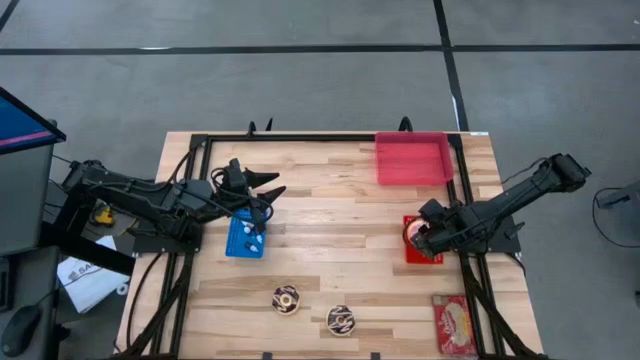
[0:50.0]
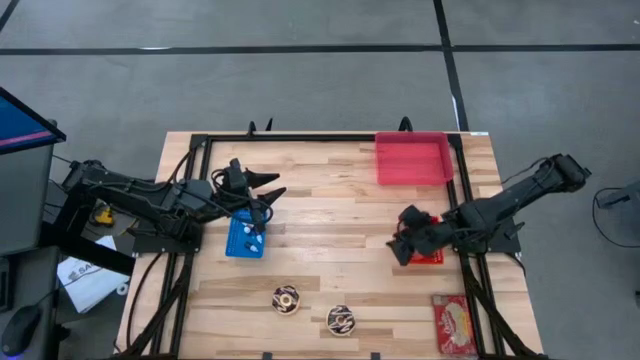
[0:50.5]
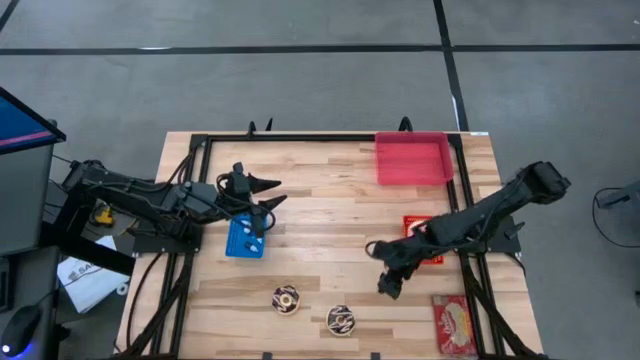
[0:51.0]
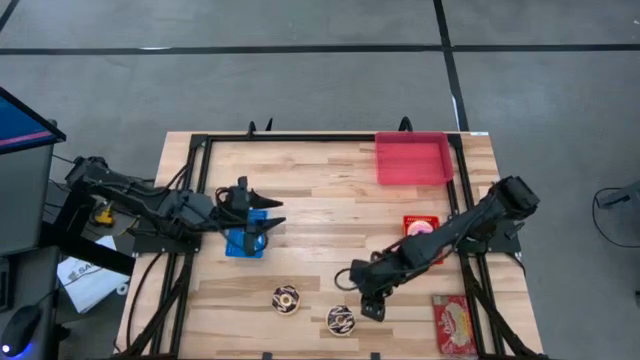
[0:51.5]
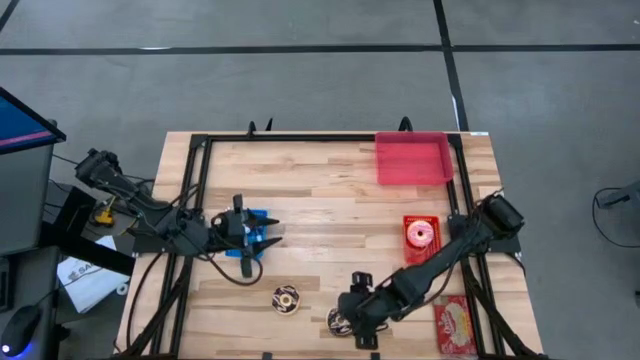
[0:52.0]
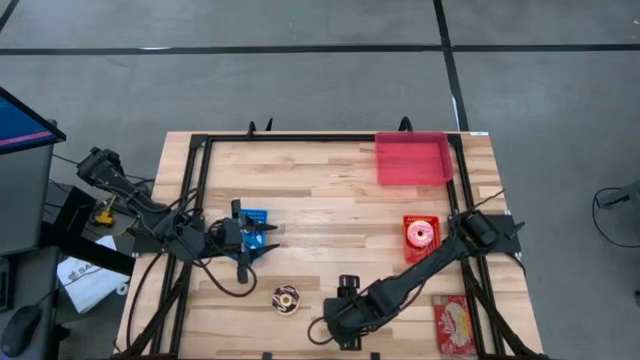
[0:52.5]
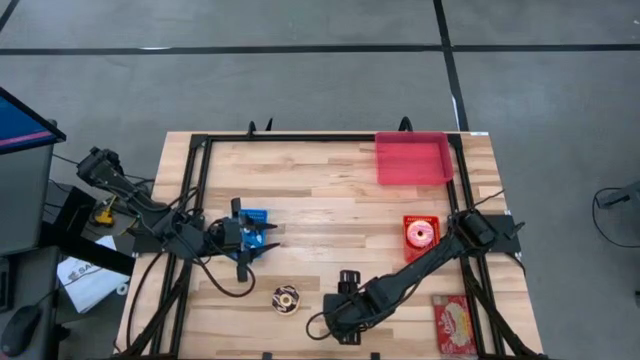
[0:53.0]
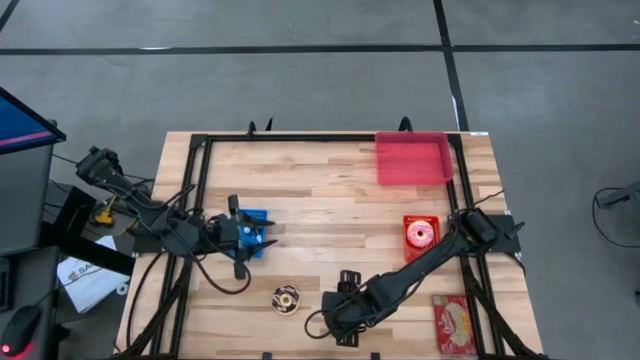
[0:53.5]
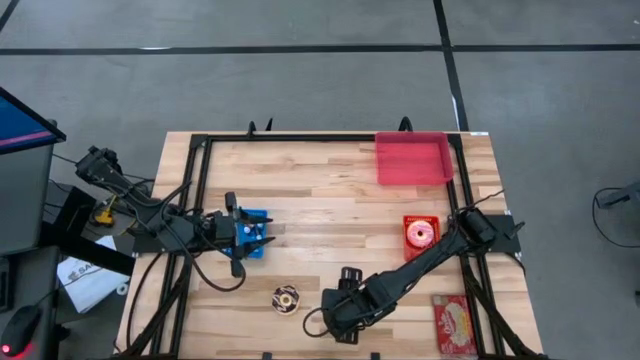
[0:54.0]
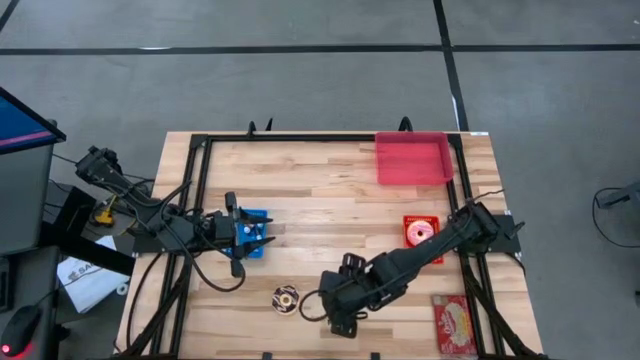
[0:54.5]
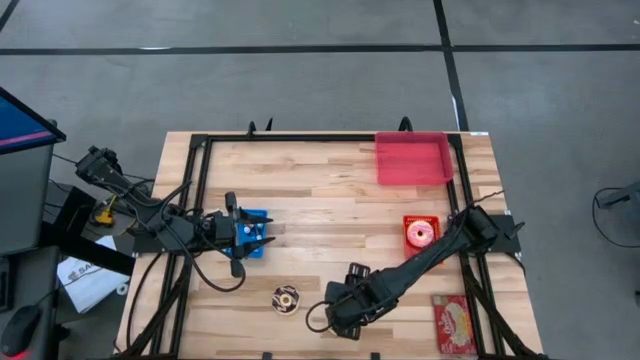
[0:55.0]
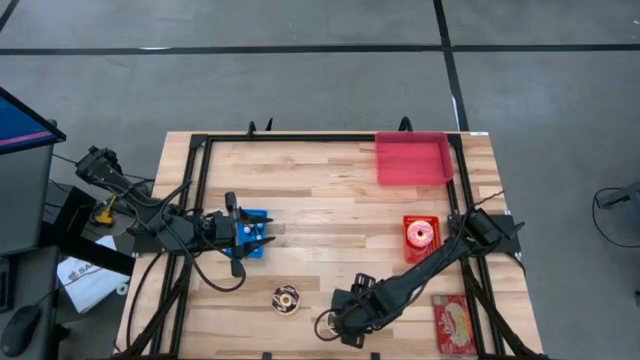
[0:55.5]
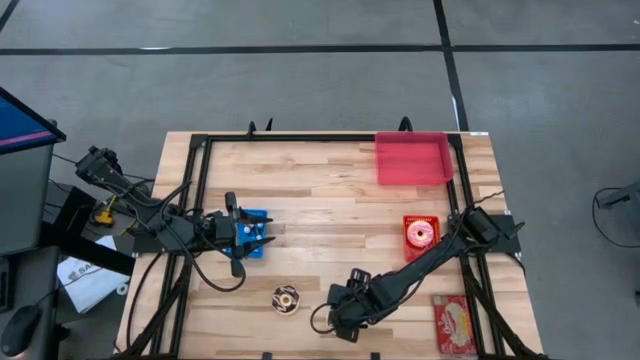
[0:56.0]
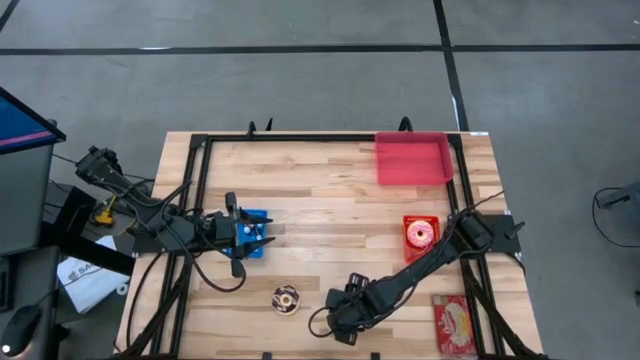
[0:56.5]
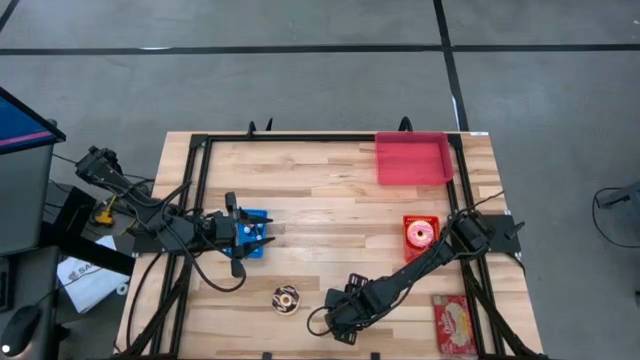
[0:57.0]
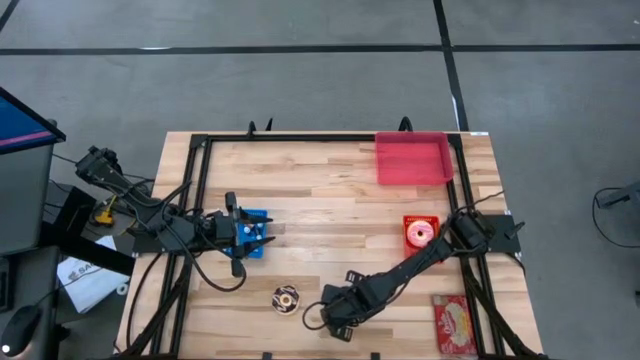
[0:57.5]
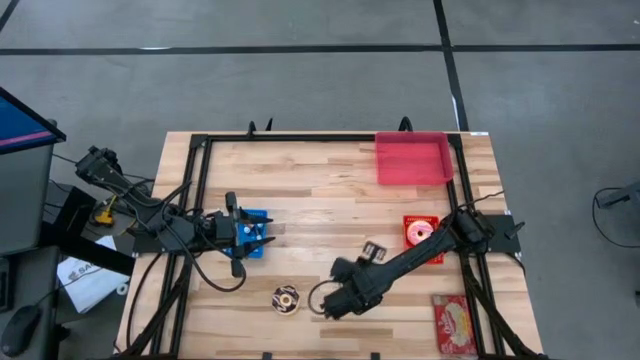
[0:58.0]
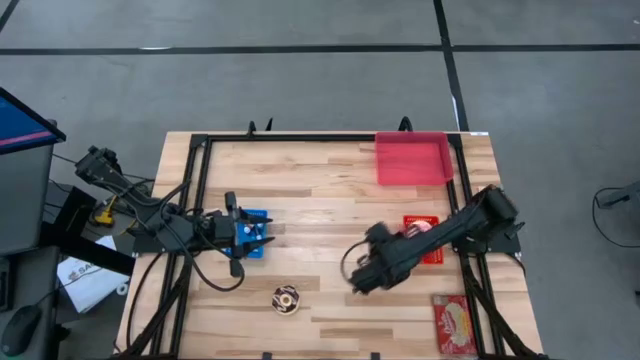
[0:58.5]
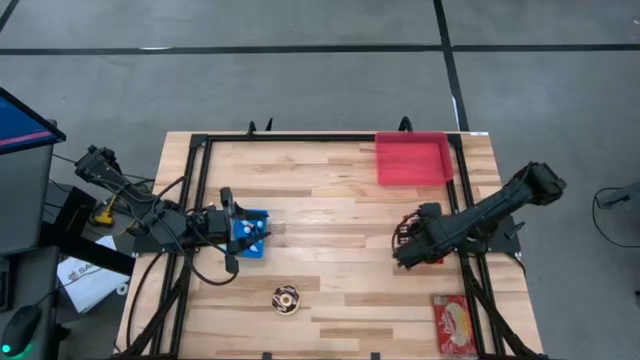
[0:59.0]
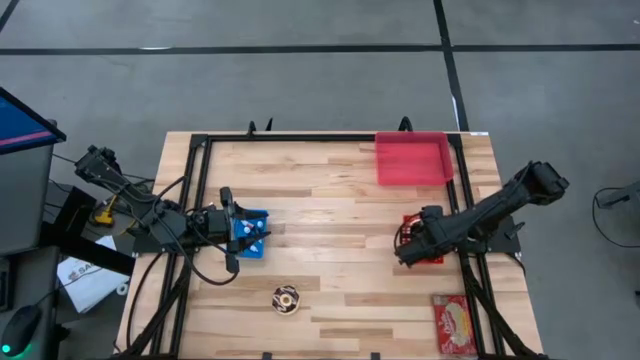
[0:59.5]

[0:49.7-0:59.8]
Put the black donut into the red bin

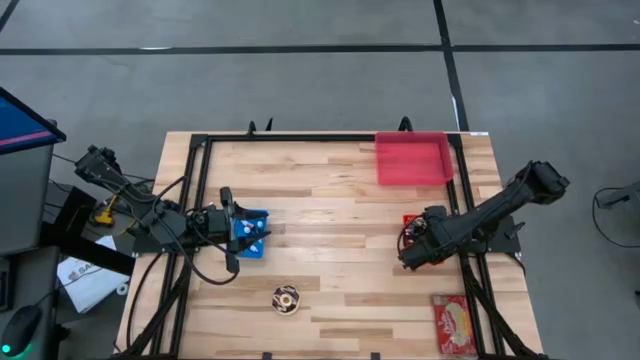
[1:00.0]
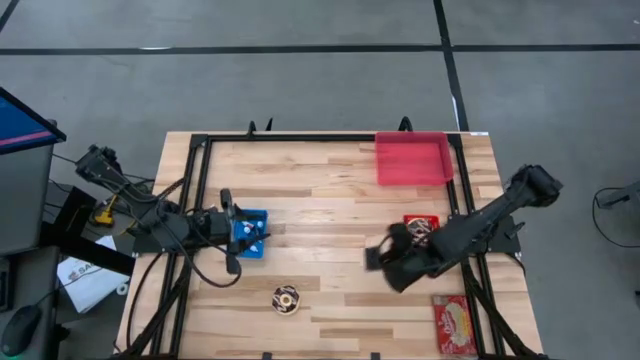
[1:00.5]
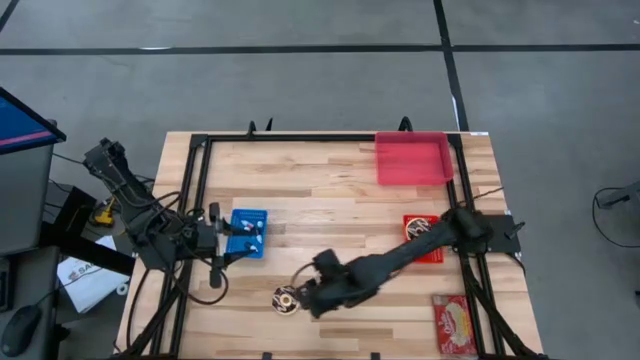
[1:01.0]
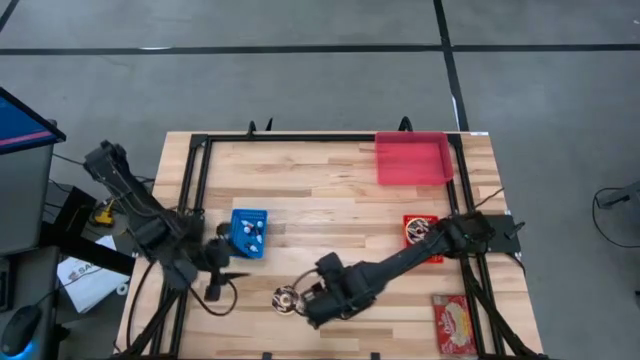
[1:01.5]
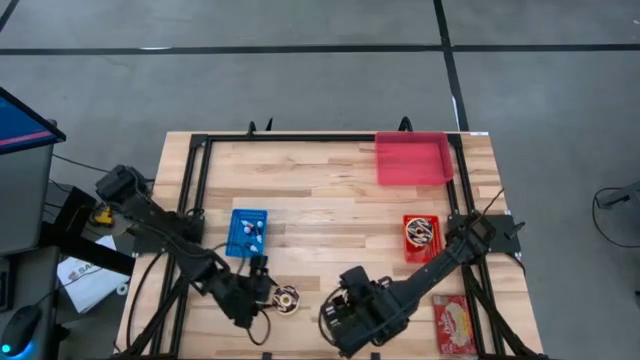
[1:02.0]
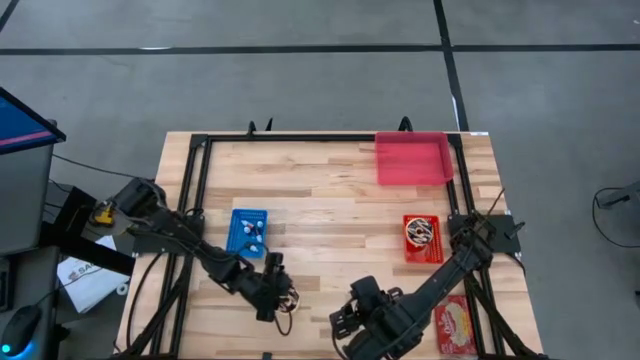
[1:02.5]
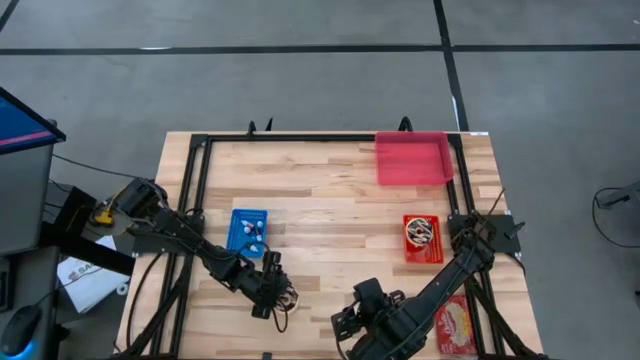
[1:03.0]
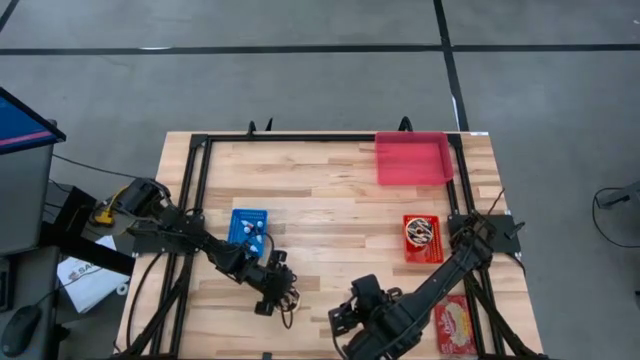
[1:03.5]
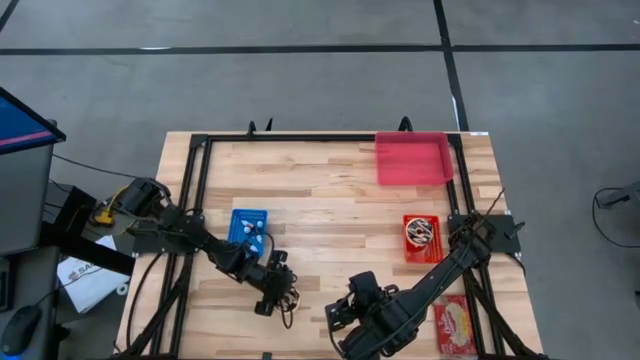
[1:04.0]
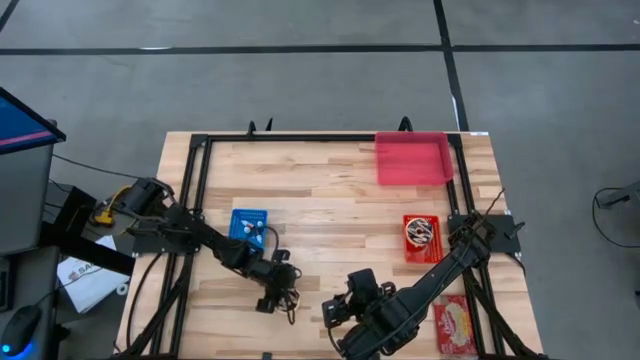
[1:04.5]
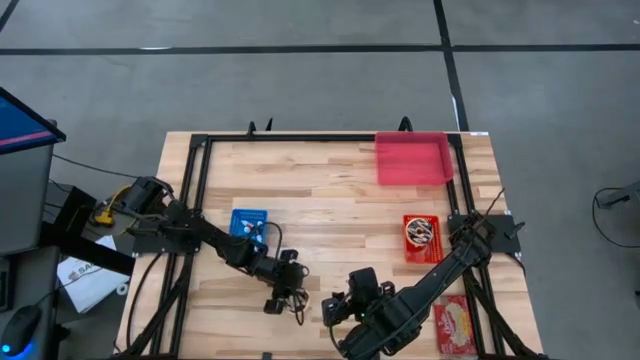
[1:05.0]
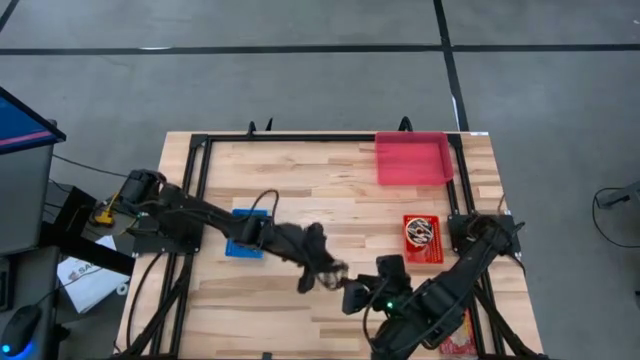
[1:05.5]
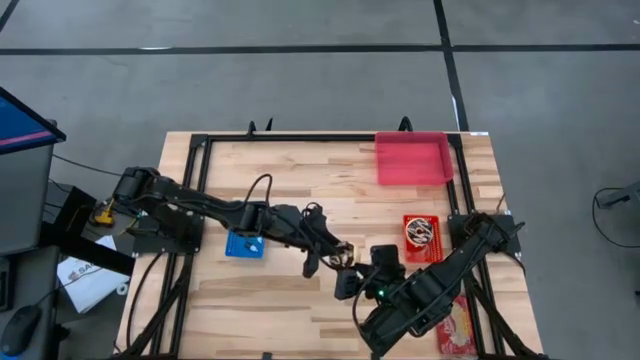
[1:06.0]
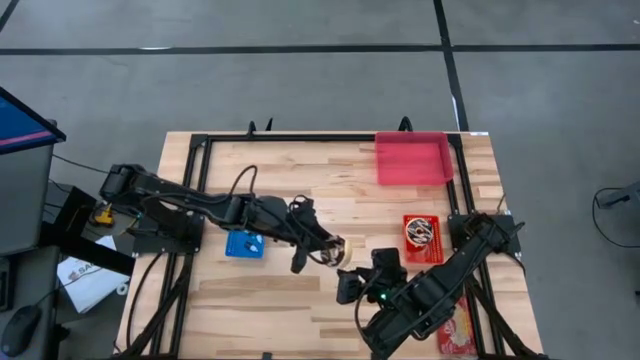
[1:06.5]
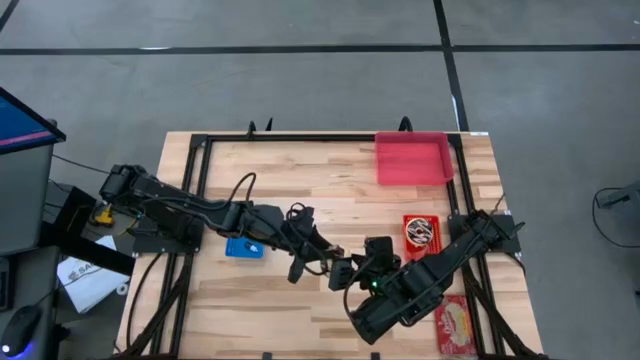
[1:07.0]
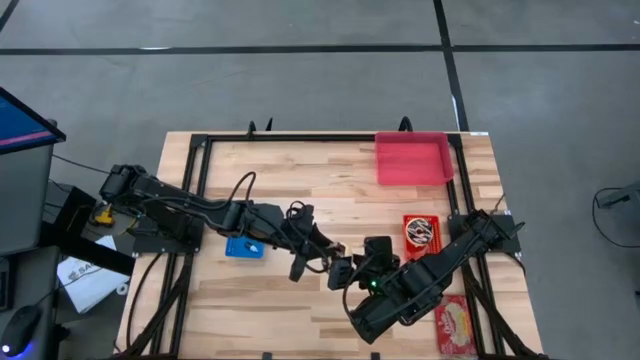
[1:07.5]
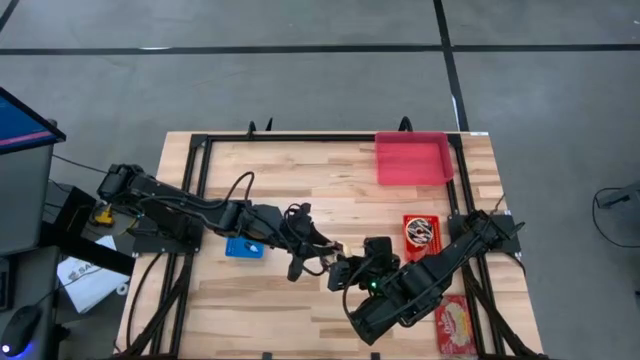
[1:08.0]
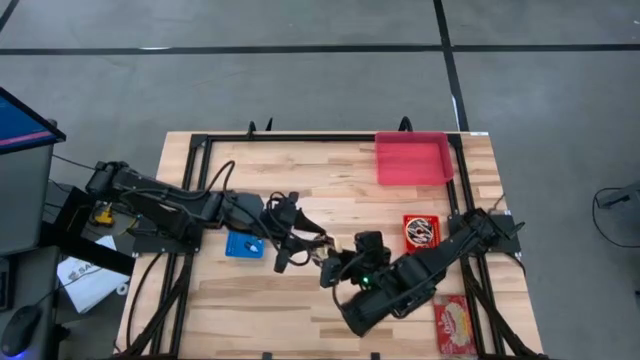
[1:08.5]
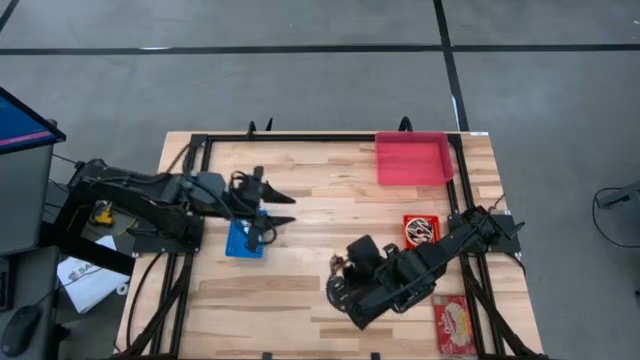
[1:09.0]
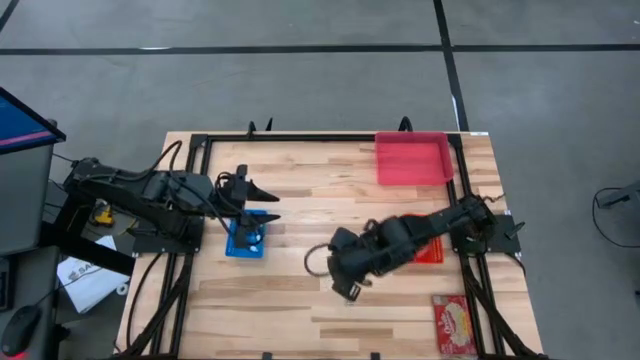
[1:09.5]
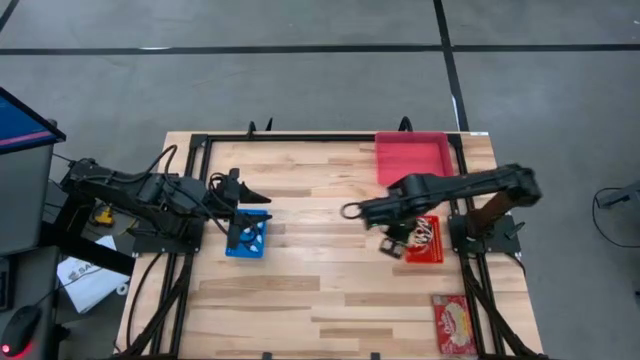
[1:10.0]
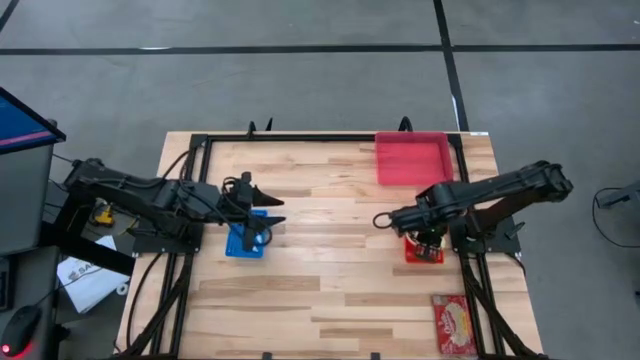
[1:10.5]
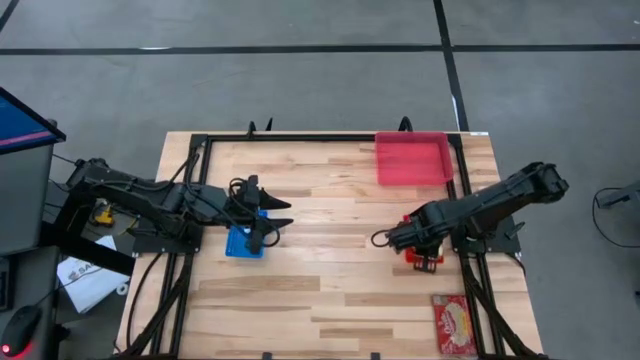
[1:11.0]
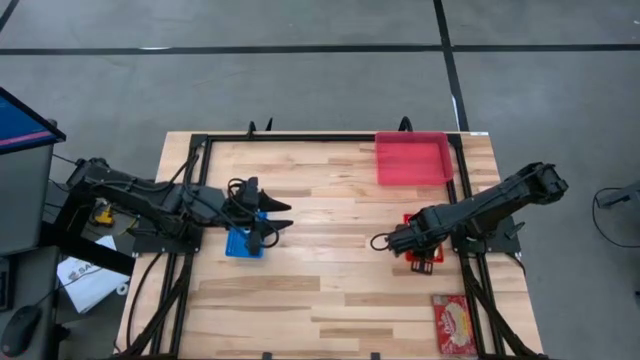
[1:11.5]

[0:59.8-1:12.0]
Put the pink donut into the red bin
